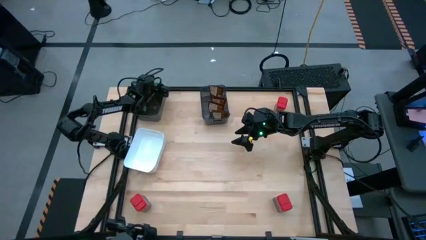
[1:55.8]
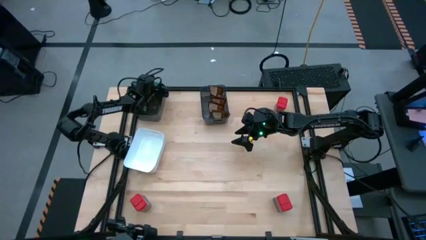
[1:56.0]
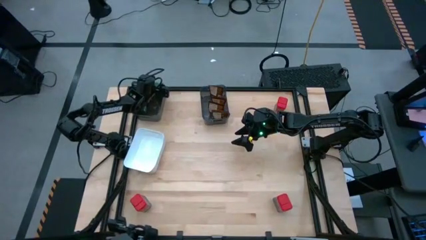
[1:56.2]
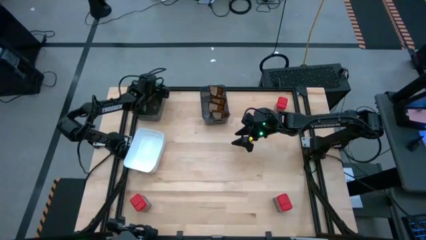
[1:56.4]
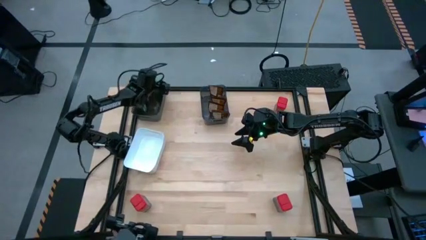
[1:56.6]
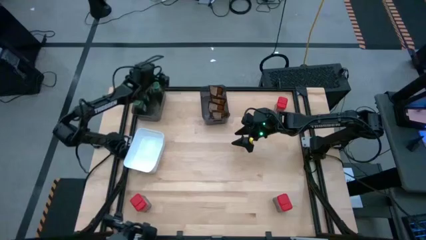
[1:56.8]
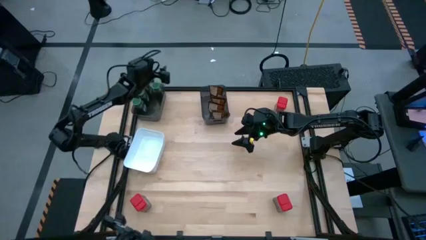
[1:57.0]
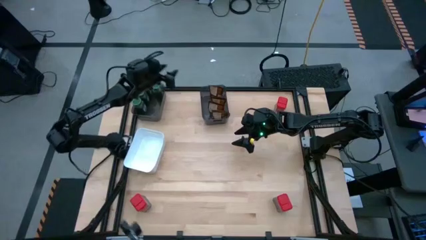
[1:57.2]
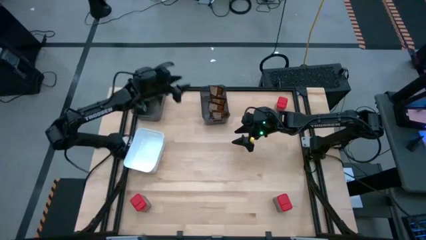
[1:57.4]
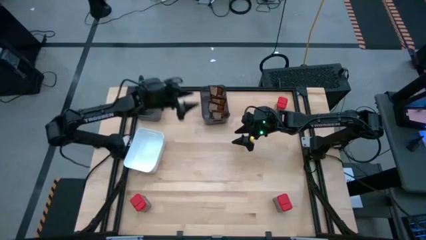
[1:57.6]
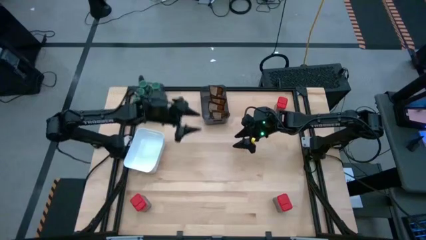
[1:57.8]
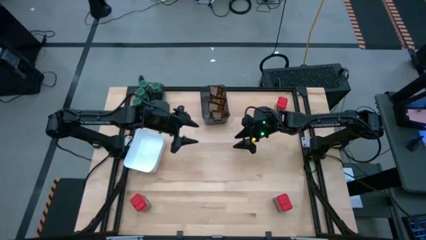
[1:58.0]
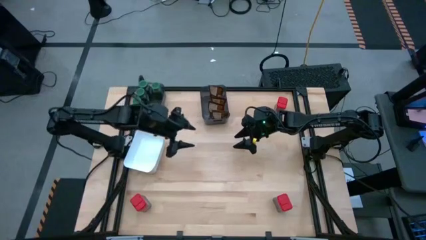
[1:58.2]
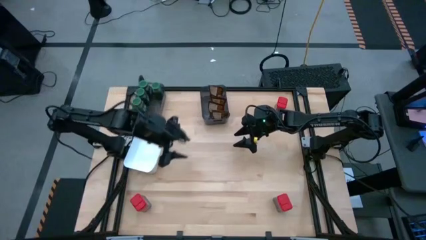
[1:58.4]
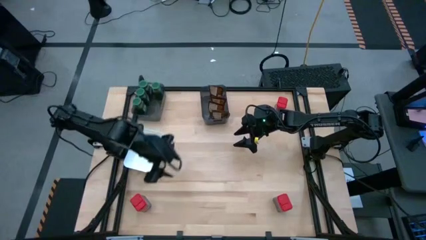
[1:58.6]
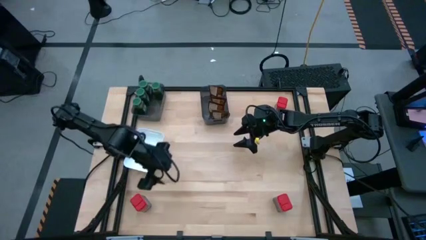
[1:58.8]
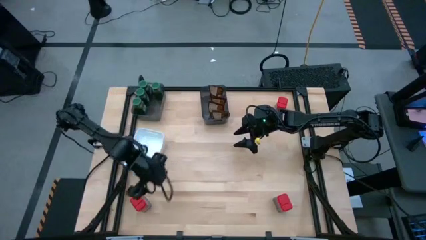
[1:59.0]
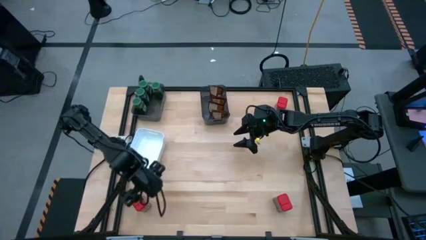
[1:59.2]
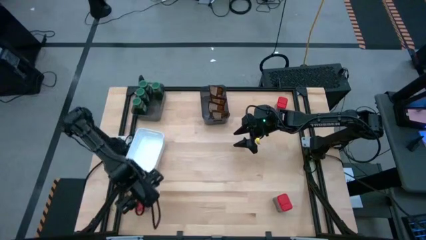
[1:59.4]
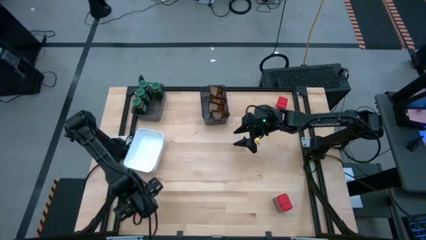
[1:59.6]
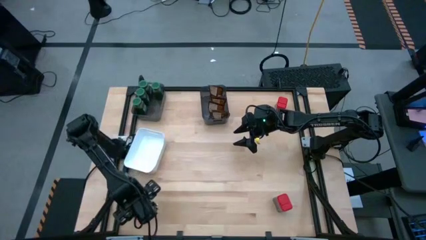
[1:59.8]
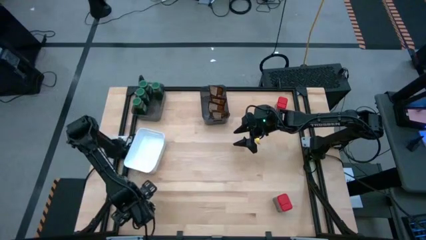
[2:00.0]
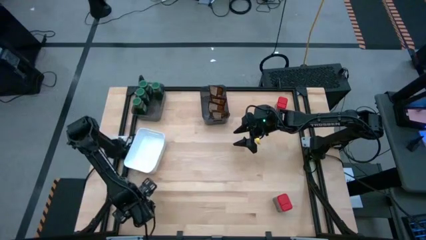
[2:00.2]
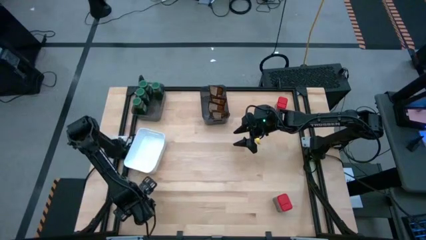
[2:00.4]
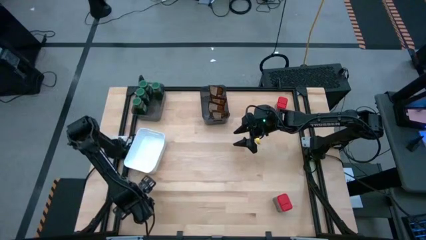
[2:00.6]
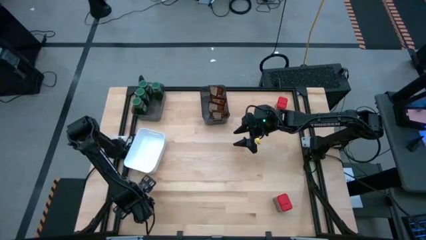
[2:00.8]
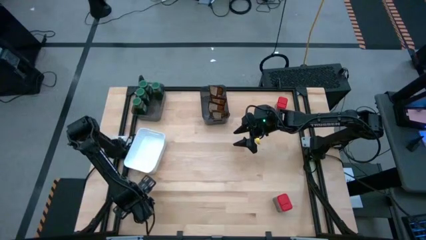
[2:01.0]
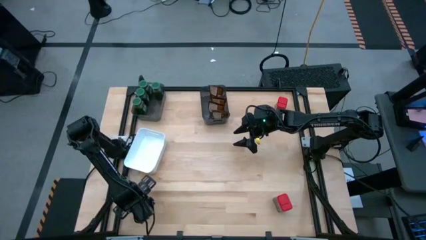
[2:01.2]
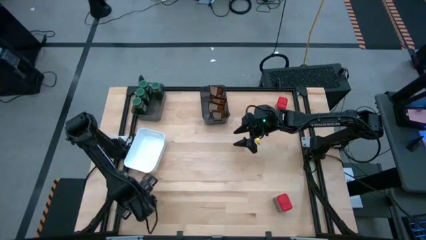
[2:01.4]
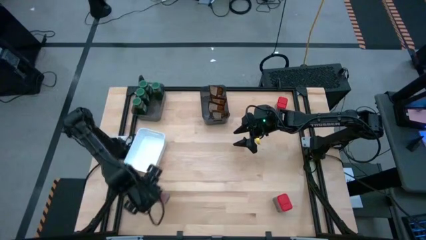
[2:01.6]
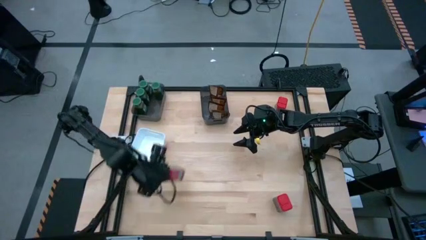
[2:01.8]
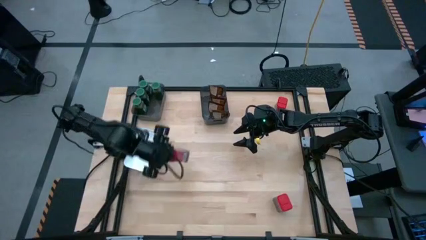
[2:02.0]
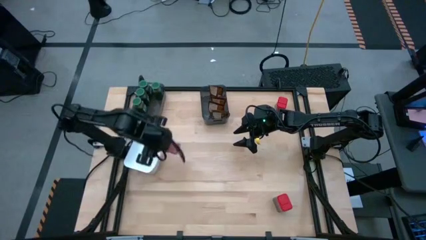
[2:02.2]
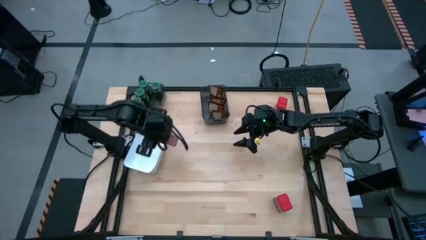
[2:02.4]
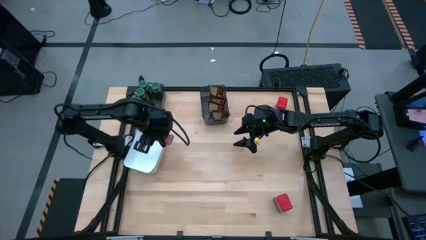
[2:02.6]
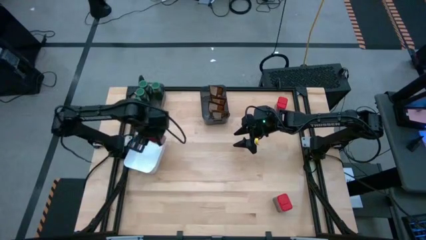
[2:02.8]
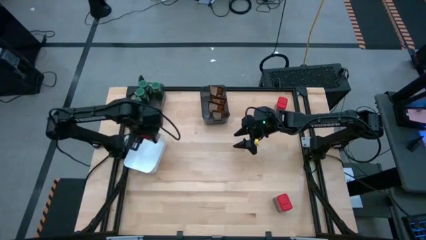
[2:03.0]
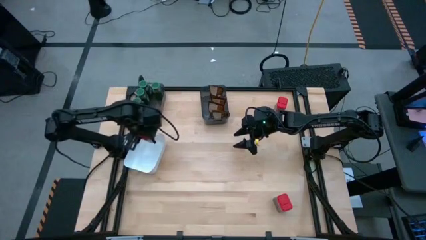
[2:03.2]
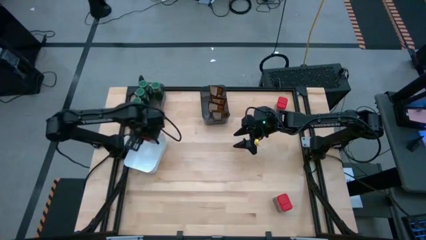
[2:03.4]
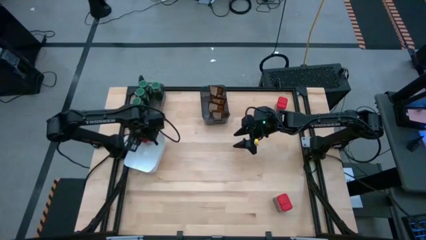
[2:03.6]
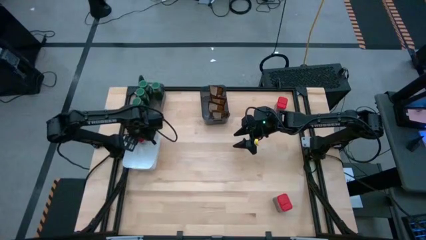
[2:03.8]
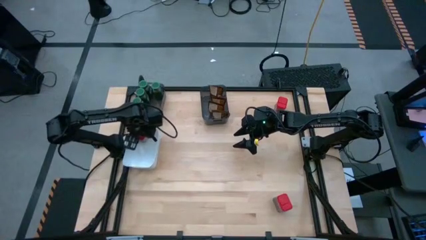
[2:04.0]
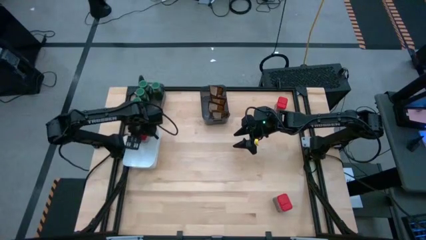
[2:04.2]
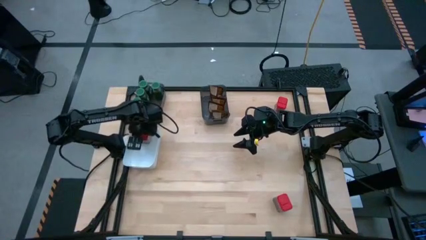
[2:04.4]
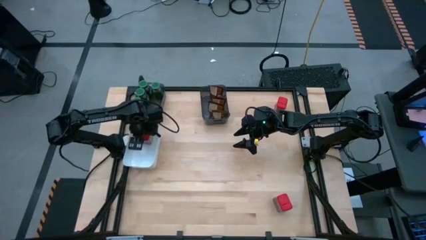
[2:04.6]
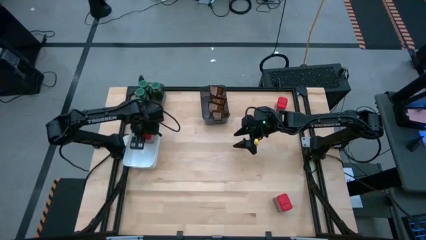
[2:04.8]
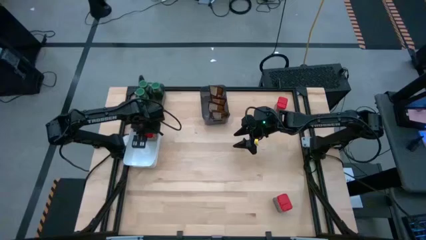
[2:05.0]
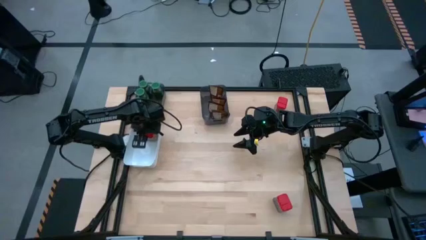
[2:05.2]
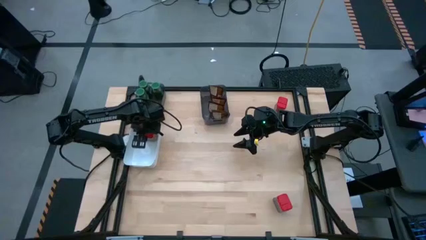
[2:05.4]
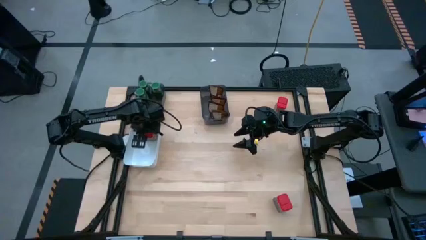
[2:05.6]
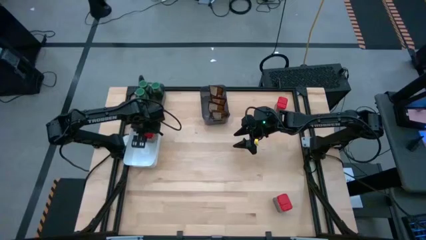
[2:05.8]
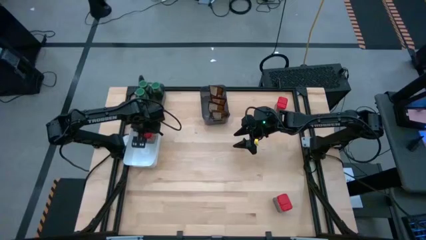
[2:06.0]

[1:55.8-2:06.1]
Task: Sort spices by type
Put the bottom left red seasoning can into the white bin

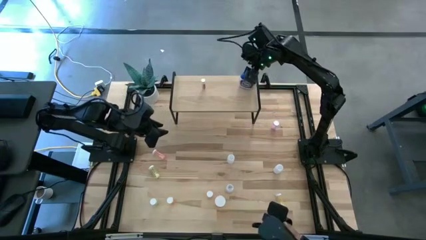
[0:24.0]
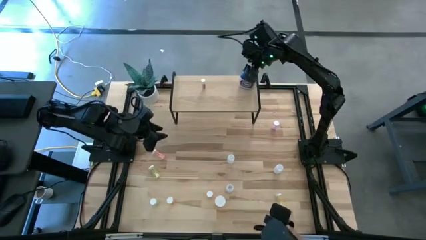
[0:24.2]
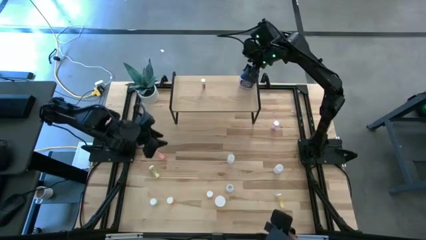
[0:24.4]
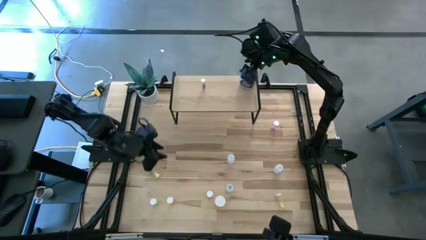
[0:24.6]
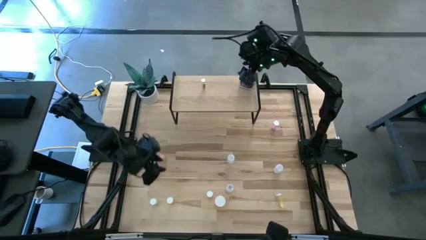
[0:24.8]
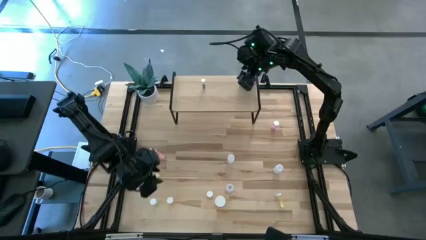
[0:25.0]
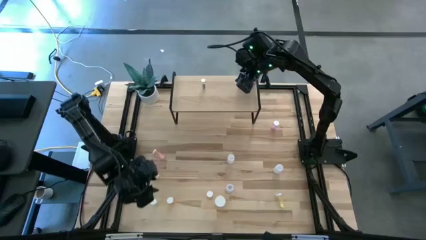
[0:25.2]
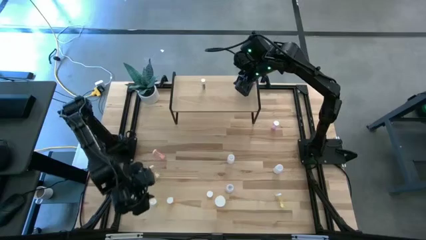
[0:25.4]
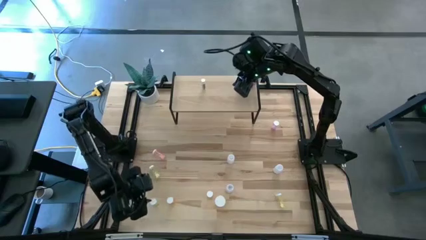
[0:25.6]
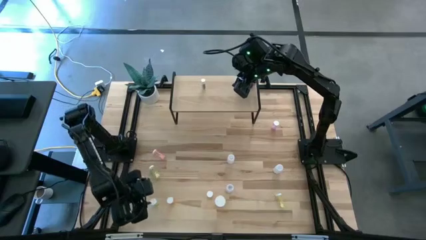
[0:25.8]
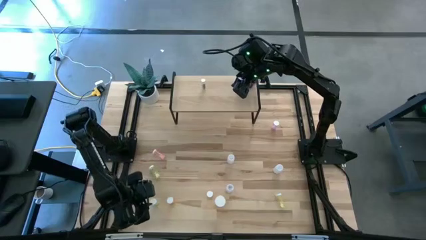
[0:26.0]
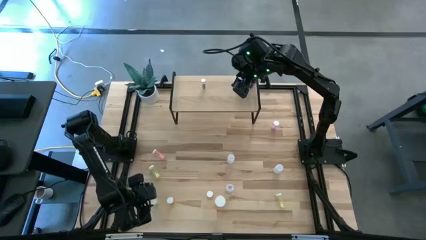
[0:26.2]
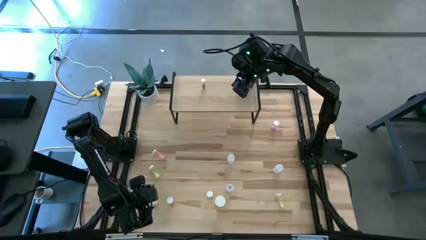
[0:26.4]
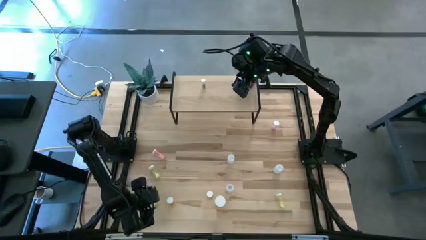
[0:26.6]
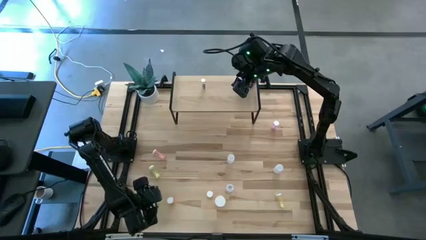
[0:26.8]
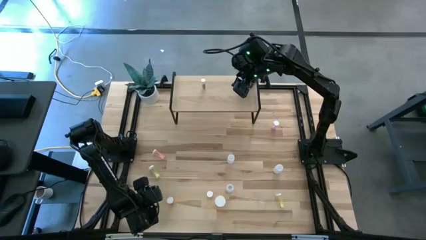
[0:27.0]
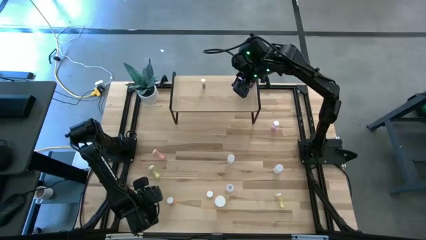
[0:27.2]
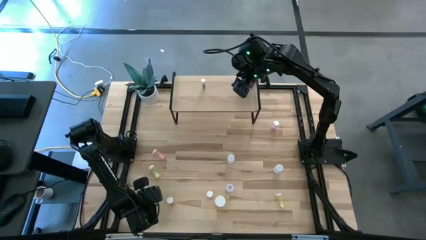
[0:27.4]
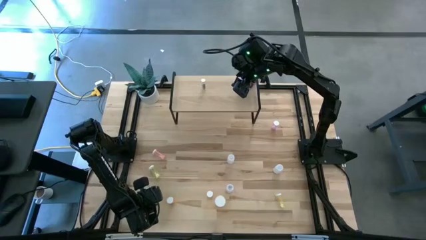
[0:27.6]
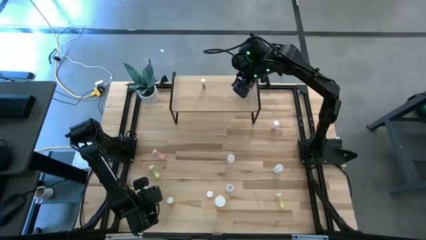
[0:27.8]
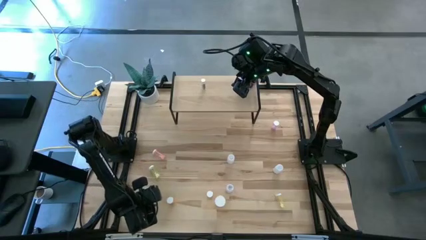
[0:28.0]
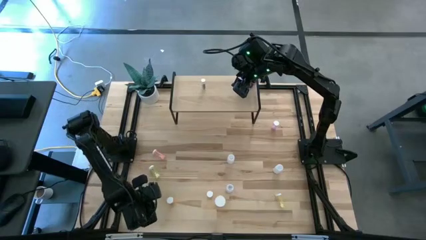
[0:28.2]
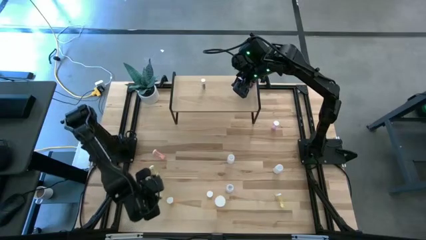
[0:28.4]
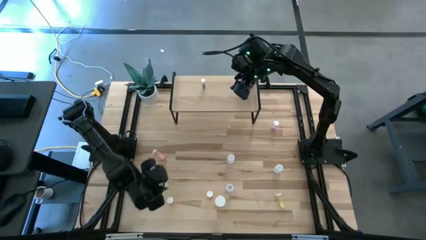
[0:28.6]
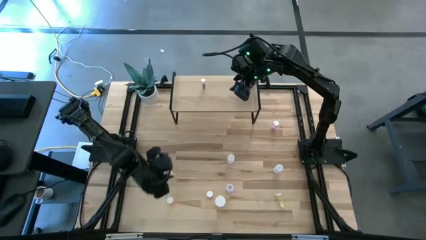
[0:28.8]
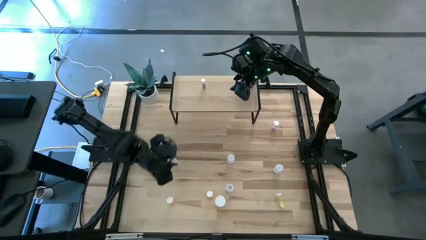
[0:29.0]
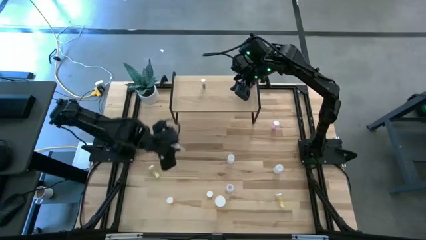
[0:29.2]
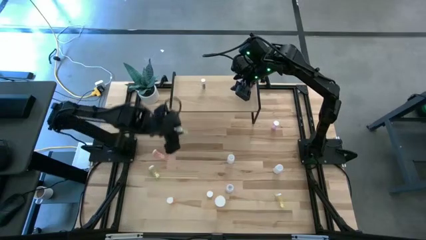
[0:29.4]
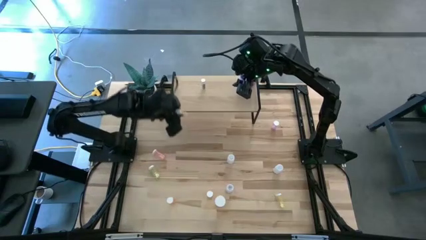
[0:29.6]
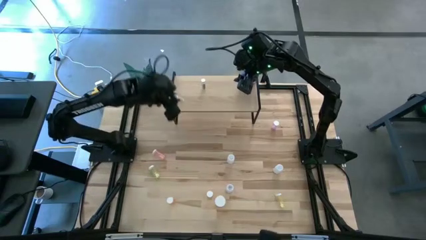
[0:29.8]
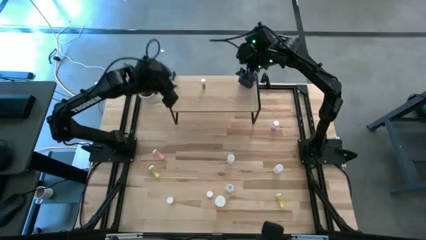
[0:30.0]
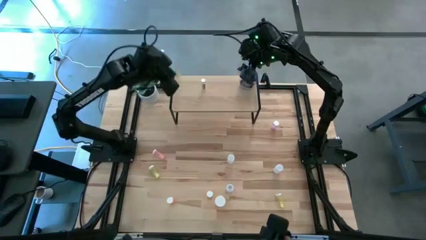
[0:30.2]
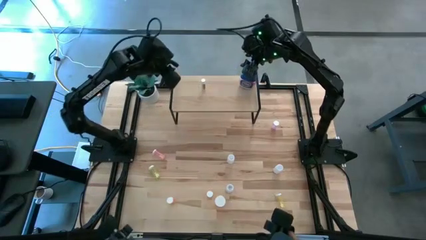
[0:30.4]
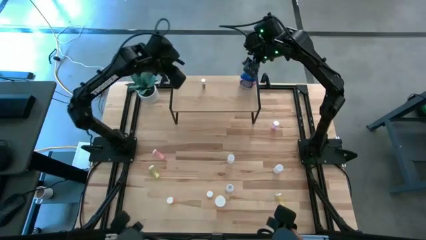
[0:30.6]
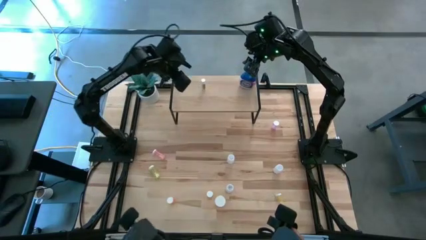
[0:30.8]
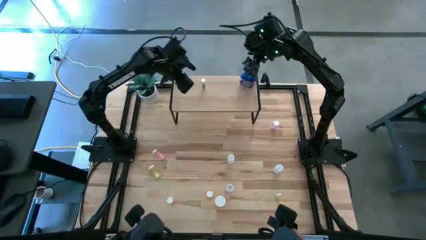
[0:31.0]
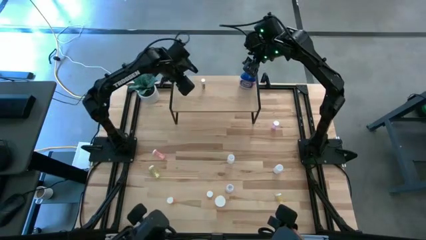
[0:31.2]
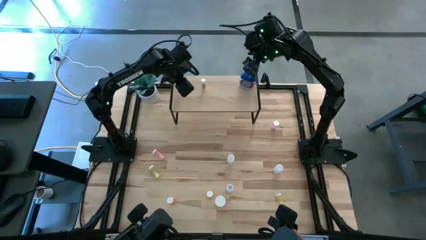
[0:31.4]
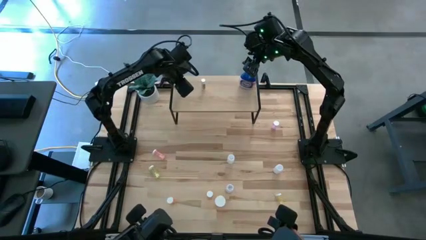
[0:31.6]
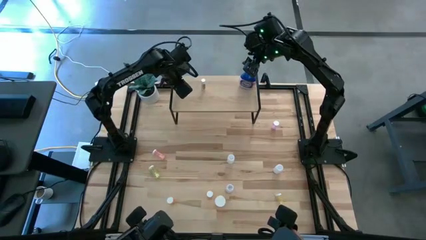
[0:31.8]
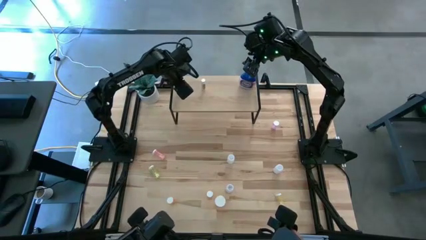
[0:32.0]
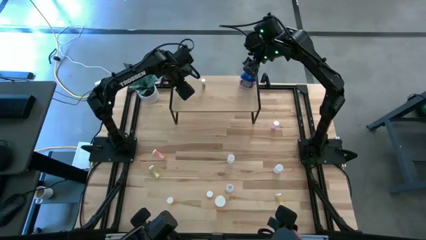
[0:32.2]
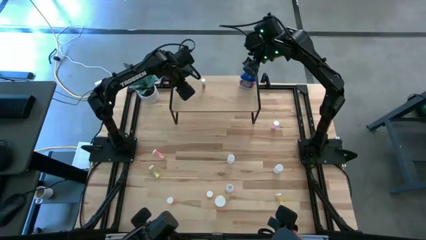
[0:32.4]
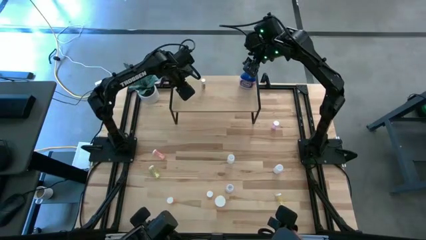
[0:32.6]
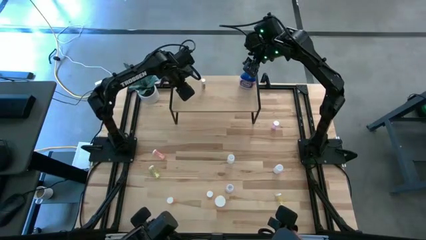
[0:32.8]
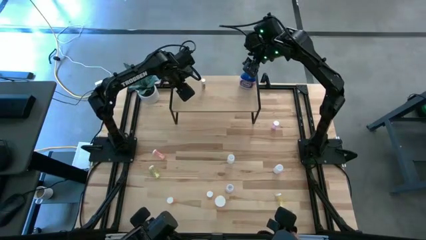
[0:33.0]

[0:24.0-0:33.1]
Task: Pick and place medicine bottles onto shelf by color
Put the bottom left yellow pill bottle on the shelf
